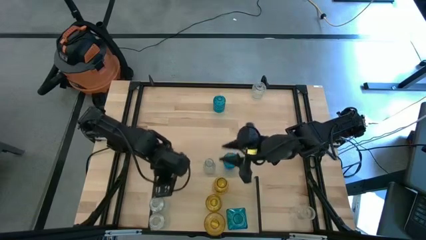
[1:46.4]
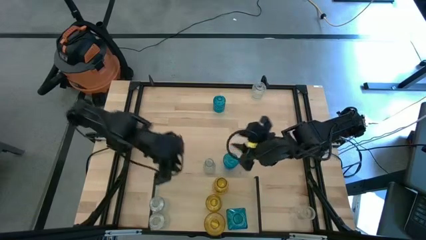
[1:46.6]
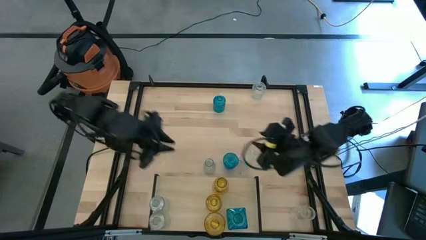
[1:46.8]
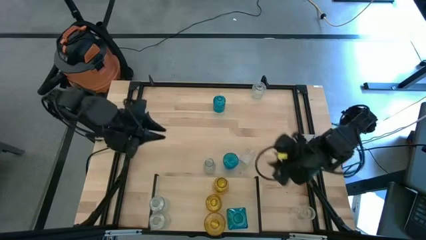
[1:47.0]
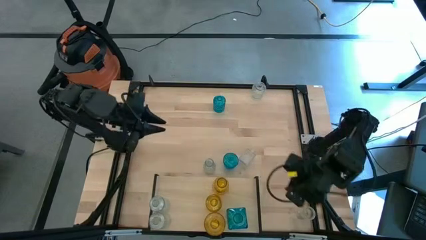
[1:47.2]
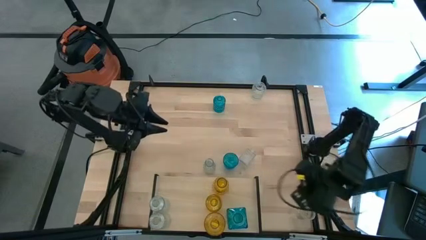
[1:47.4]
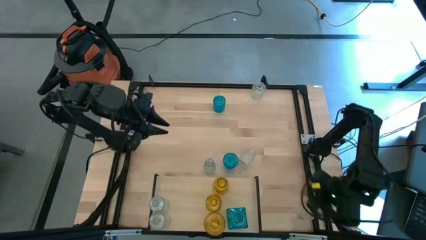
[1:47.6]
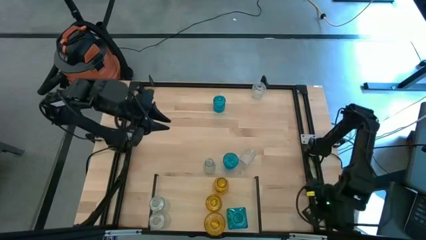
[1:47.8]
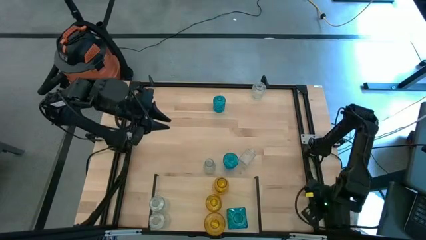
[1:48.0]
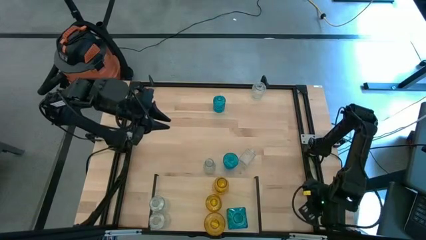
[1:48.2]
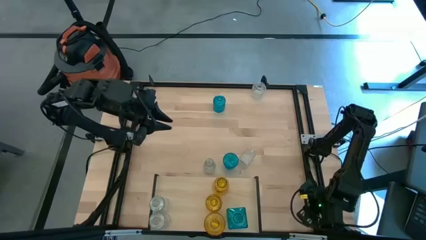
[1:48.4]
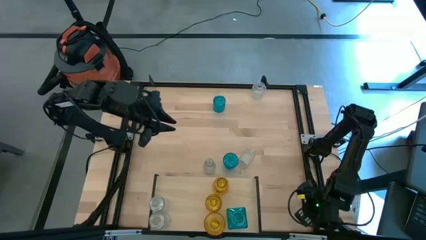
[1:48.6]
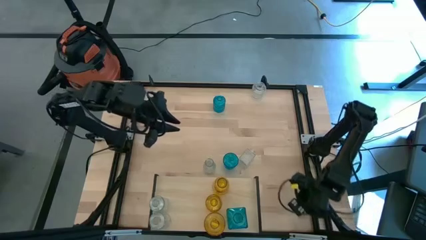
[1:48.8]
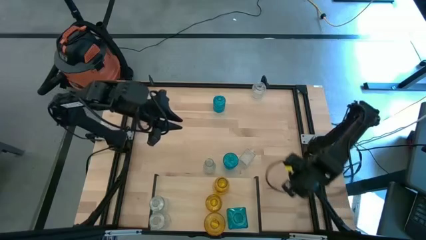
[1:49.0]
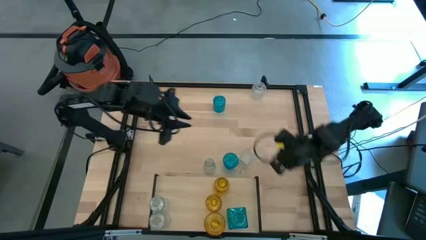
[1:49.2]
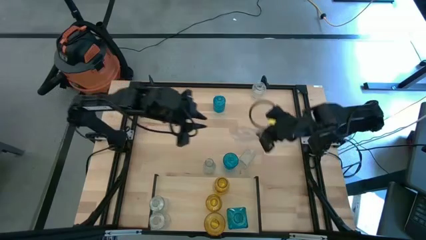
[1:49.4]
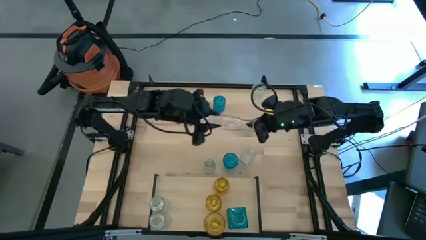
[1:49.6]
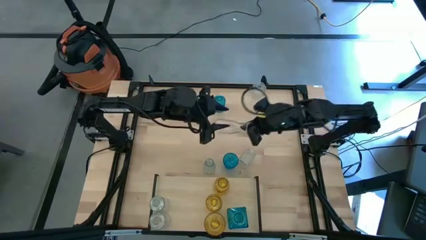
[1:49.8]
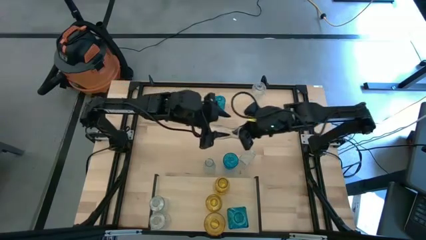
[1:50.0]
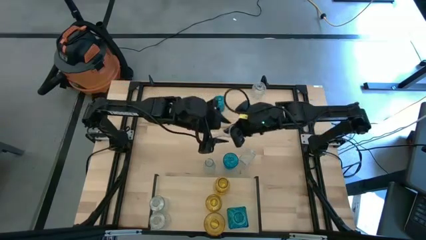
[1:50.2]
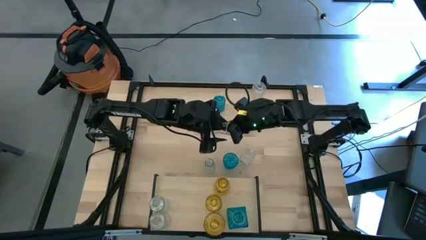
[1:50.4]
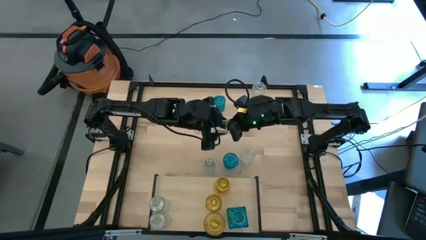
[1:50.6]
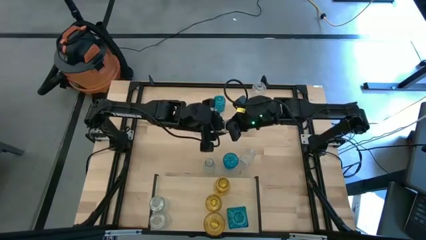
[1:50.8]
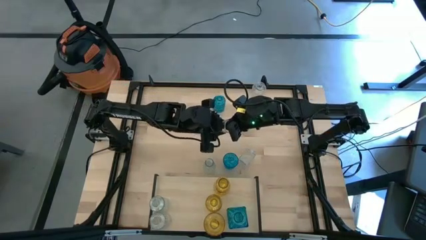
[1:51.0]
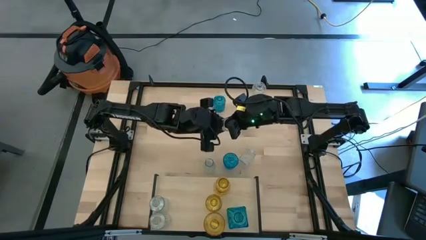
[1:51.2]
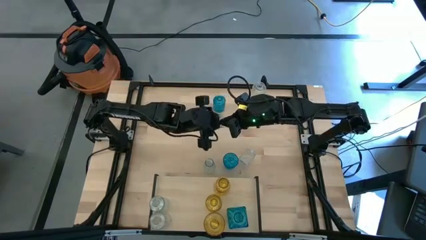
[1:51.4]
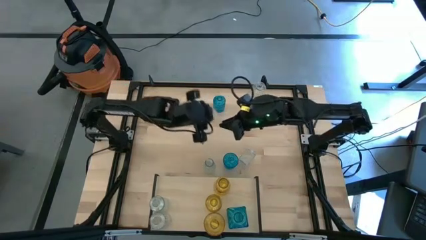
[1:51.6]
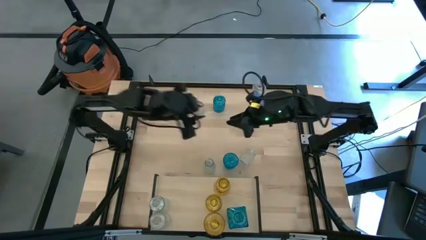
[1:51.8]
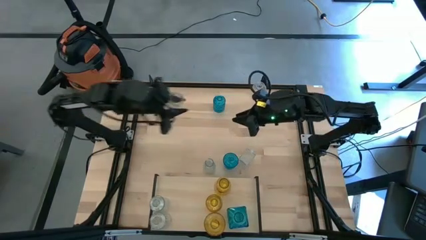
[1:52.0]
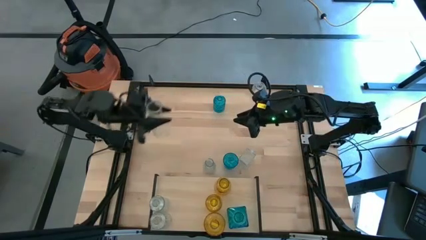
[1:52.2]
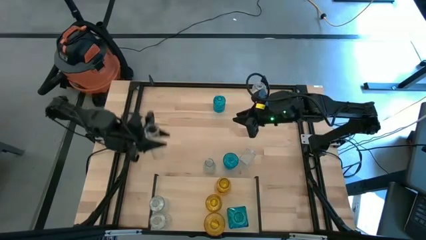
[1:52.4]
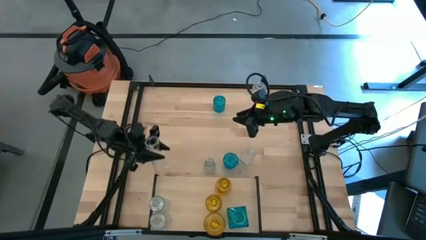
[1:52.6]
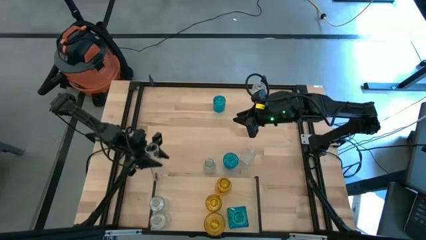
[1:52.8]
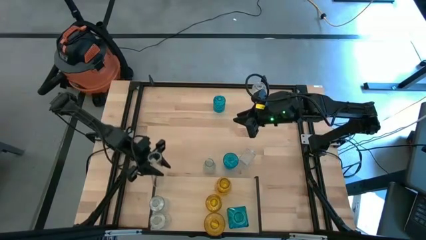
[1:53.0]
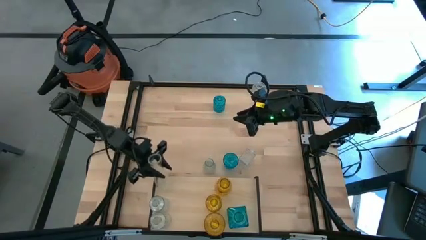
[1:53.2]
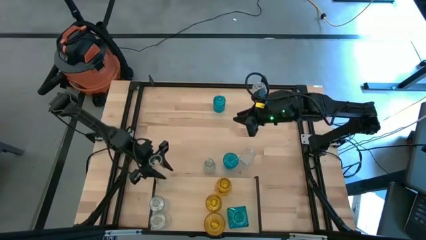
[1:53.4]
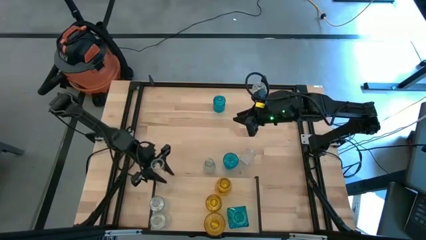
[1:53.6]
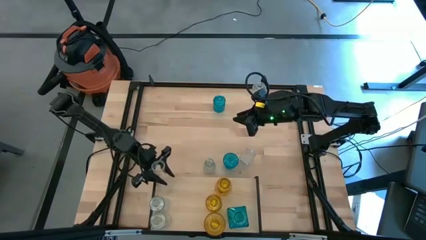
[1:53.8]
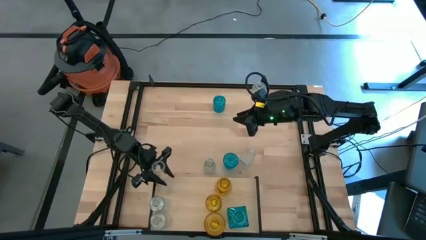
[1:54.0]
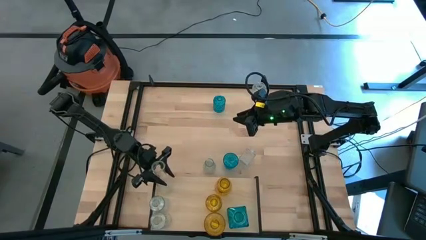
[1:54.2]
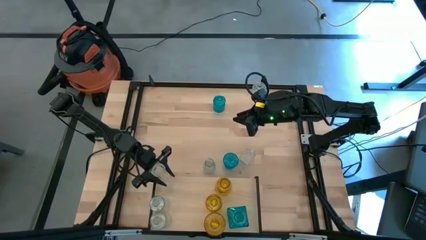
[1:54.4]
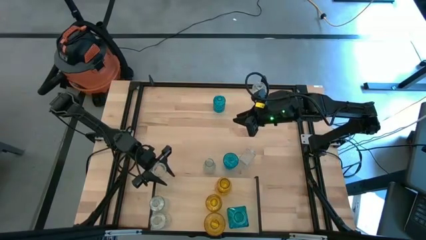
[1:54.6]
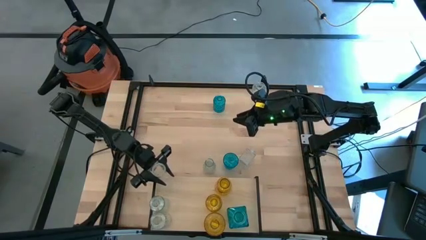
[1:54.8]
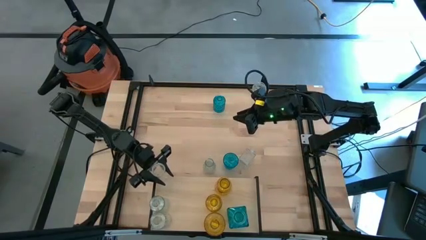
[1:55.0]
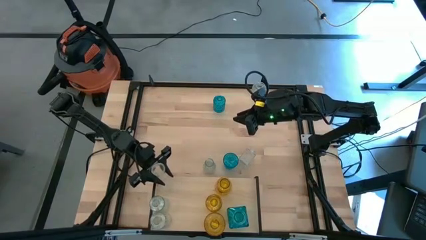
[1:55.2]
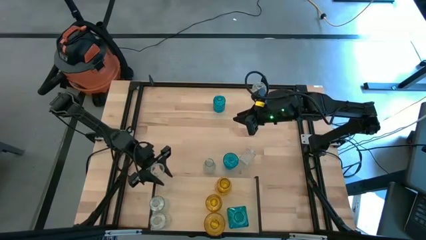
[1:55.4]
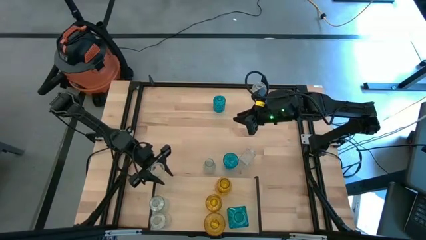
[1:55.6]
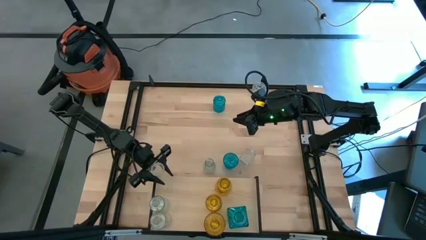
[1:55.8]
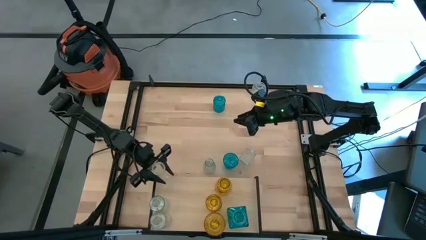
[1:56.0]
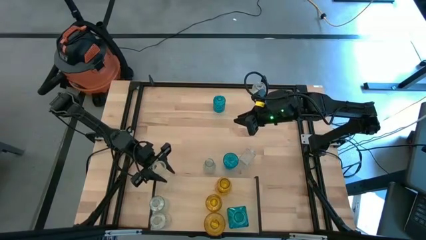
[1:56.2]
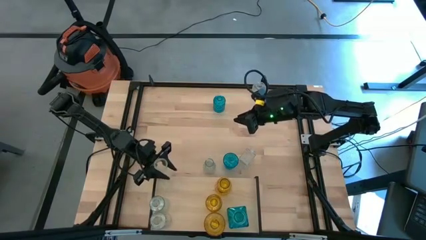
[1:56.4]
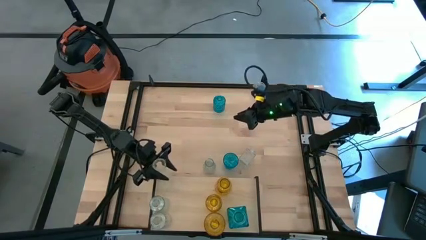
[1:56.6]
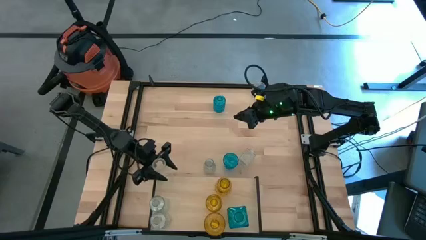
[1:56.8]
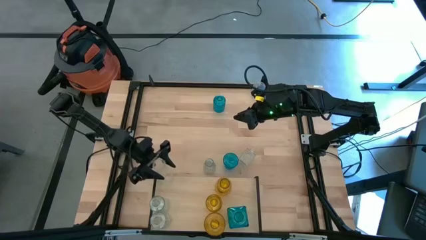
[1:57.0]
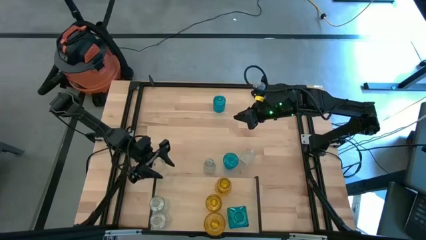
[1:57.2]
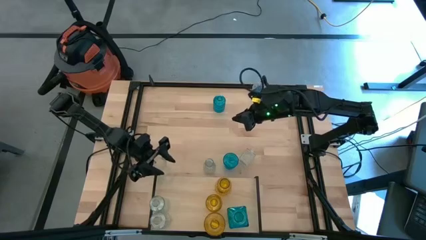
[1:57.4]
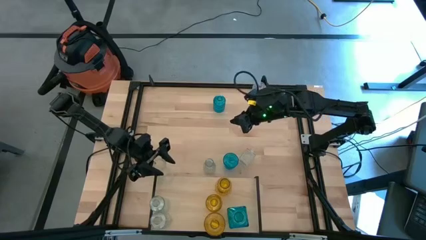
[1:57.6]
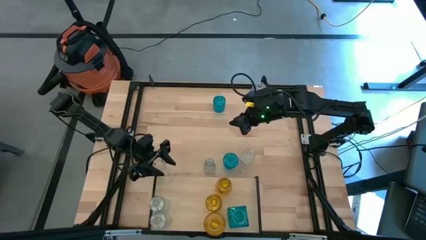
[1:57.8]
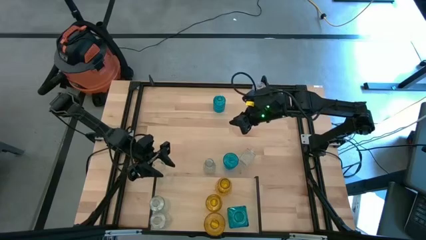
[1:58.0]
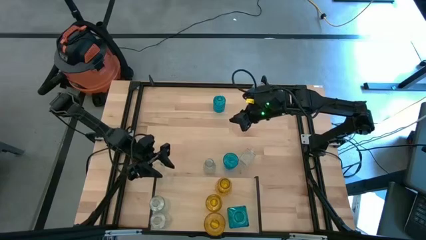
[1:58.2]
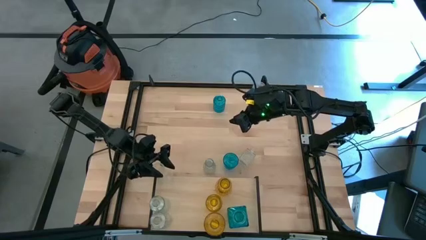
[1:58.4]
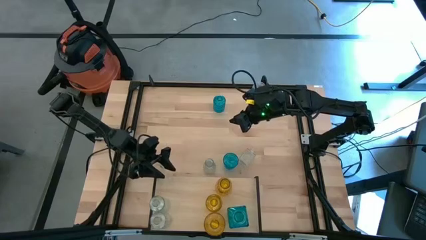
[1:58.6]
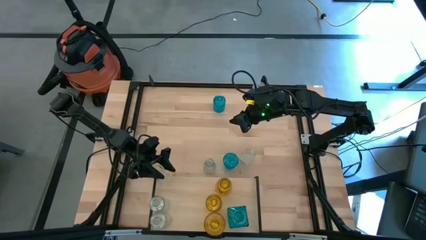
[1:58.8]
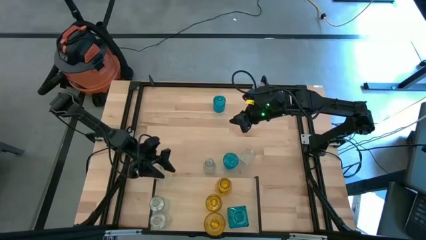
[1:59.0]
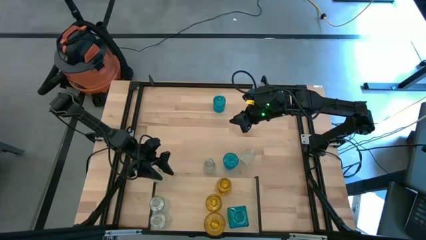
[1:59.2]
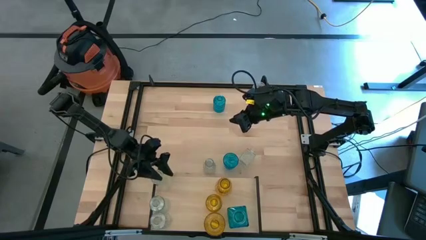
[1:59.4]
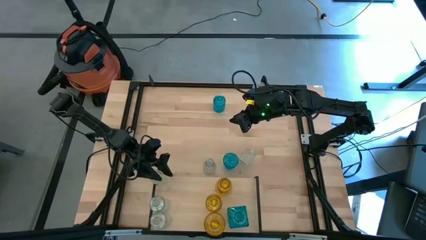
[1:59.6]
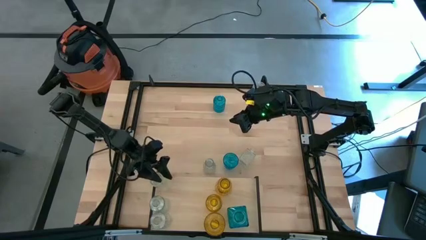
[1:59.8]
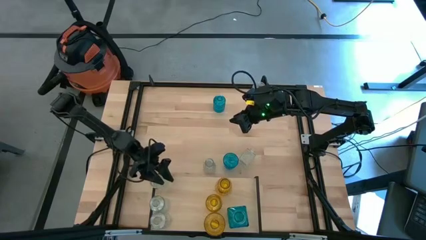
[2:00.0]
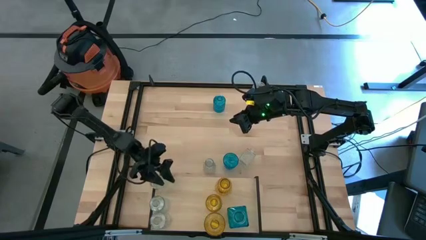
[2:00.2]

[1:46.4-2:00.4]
Task: sort vases onto shelf
Put the transparent vase on the shelf aligned with the other transparent vase

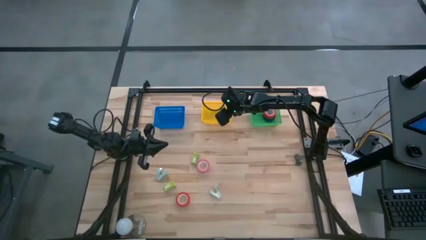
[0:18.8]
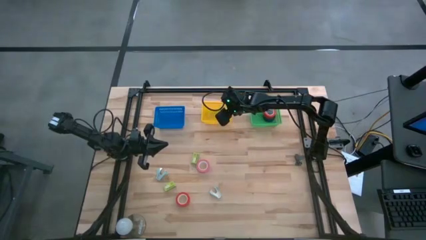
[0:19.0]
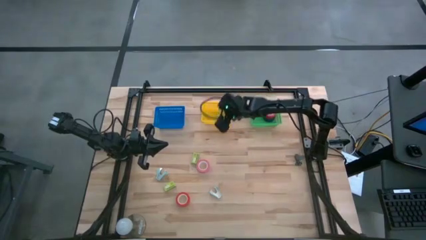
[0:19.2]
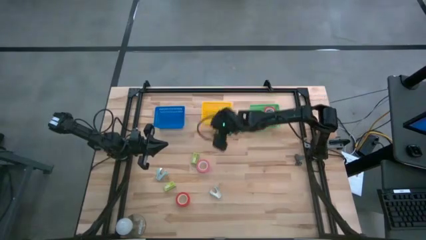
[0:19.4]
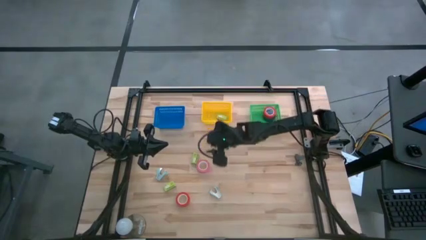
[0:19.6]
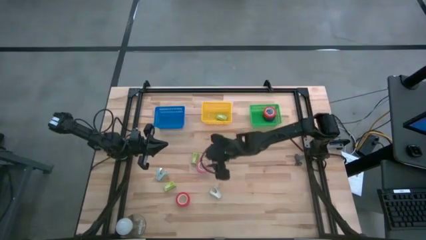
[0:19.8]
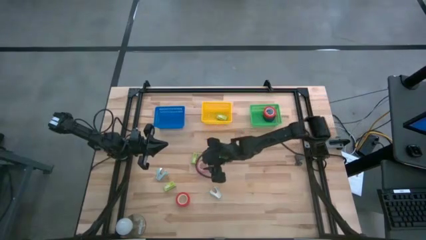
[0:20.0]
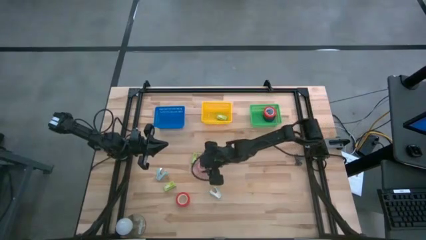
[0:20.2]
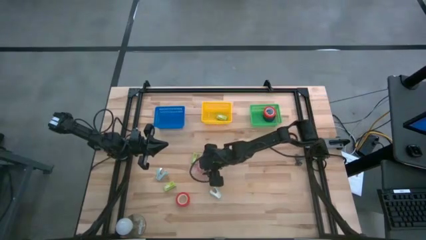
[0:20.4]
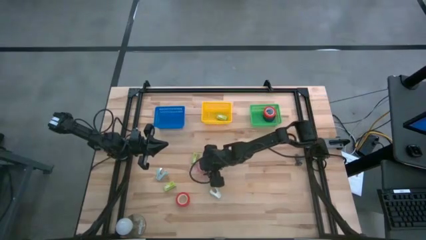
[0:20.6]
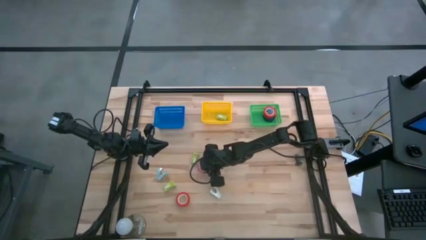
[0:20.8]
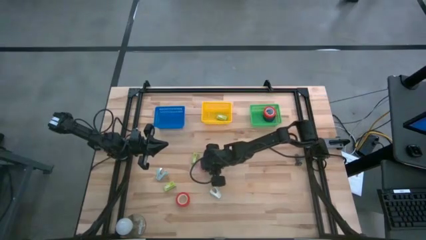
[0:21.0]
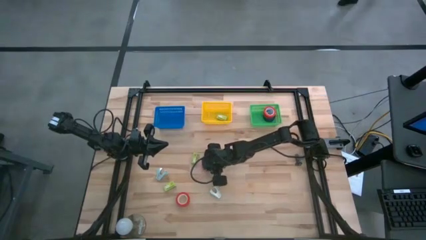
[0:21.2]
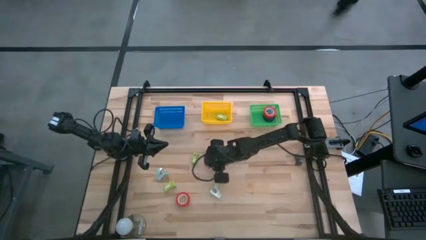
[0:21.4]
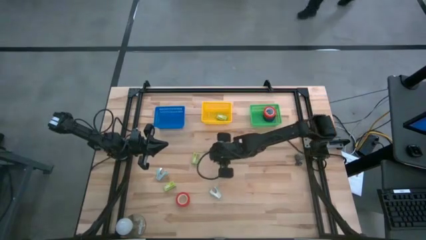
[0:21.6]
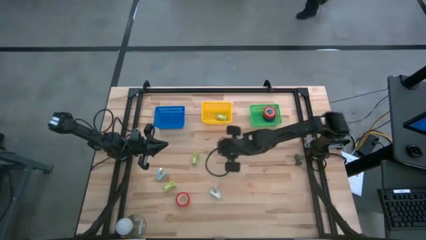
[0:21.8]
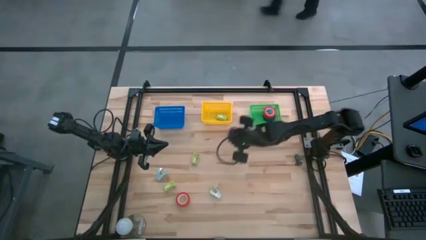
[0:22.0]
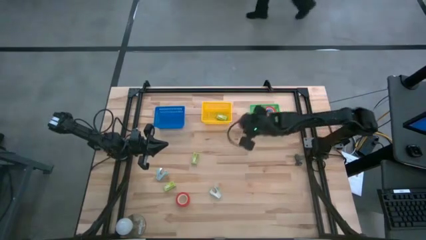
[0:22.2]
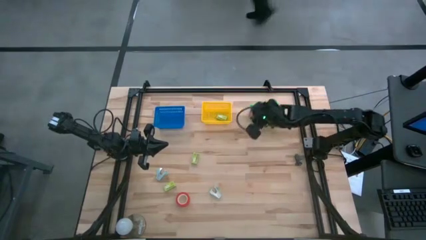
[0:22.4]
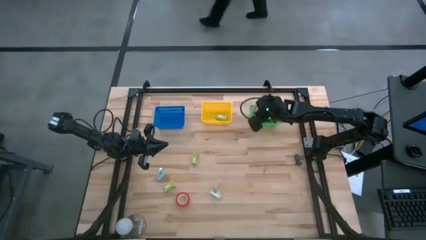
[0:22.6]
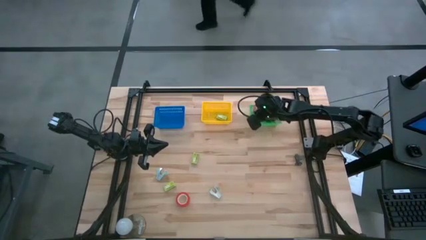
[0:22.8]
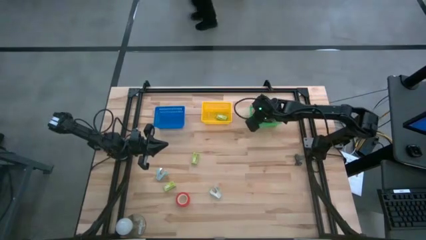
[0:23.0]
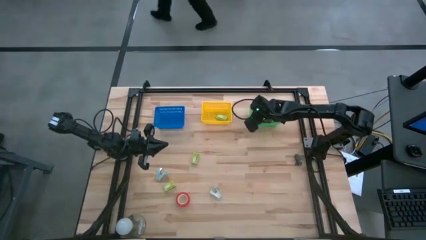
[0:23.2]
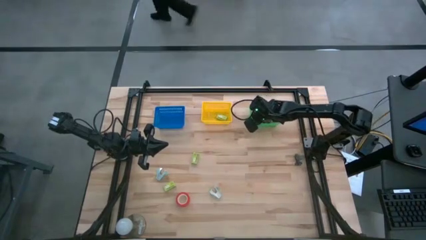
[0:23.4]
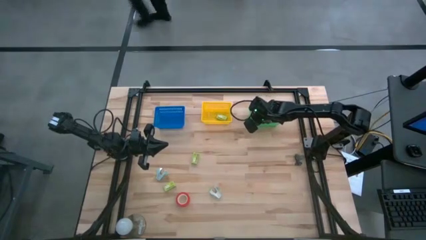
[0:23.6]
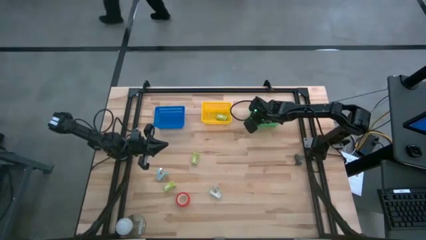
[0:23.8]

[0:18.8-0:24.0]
Task: Pick and place Stapler, Stapler remover, tape
Put the pink tape into the green basket
